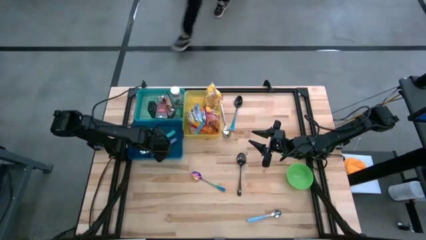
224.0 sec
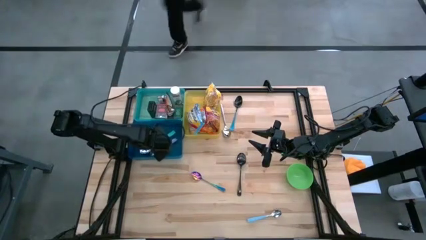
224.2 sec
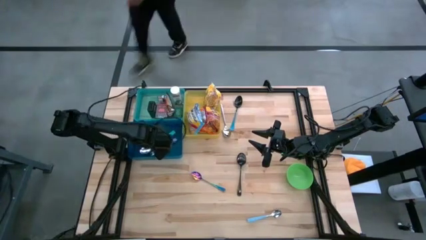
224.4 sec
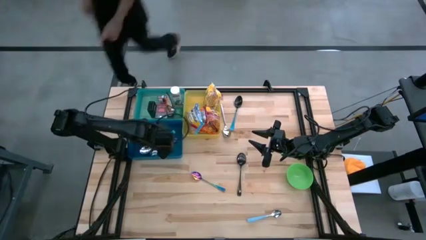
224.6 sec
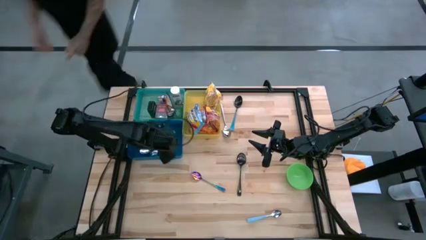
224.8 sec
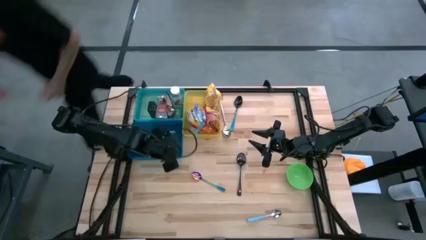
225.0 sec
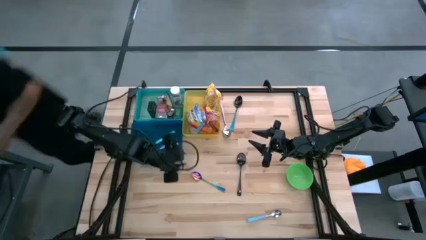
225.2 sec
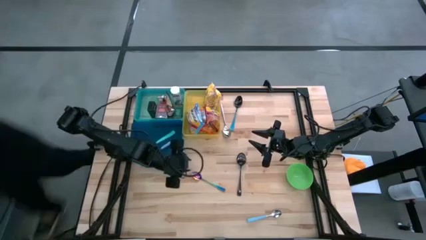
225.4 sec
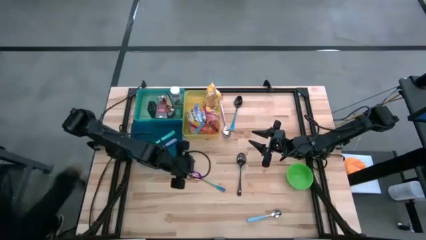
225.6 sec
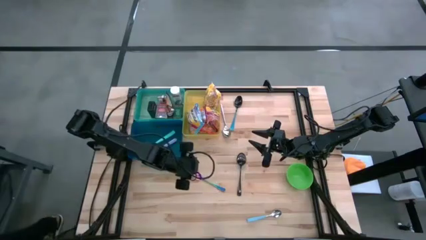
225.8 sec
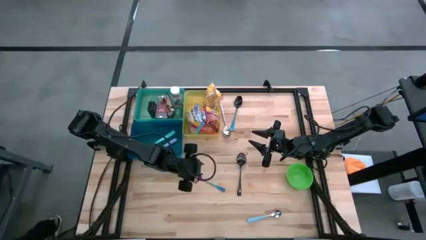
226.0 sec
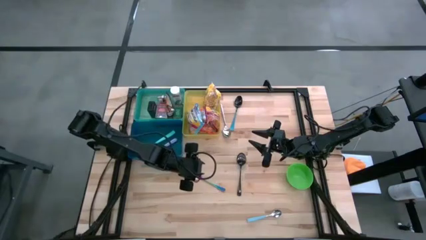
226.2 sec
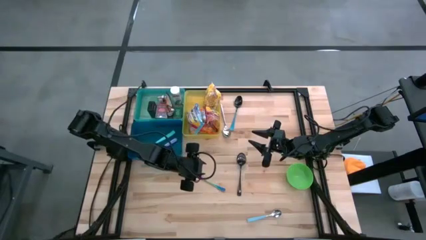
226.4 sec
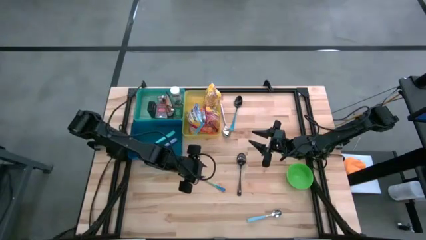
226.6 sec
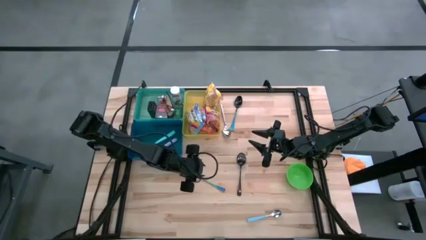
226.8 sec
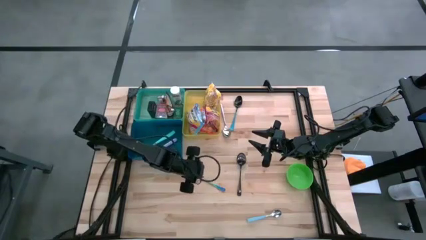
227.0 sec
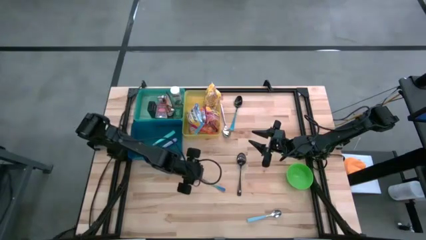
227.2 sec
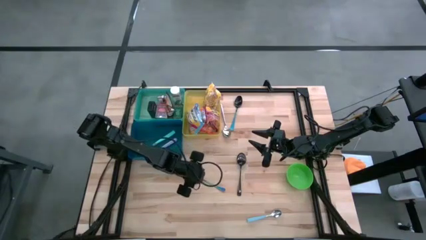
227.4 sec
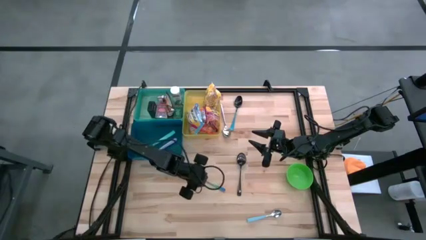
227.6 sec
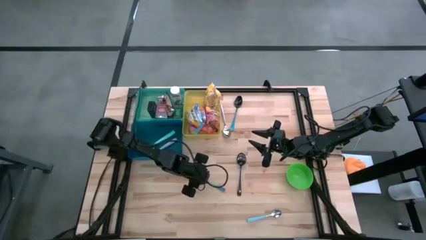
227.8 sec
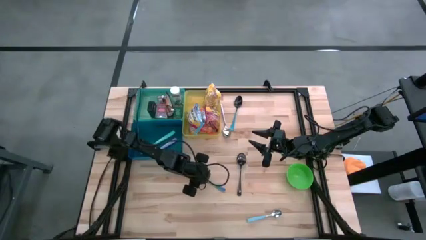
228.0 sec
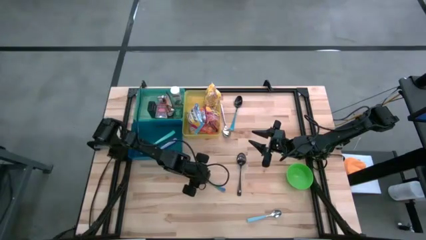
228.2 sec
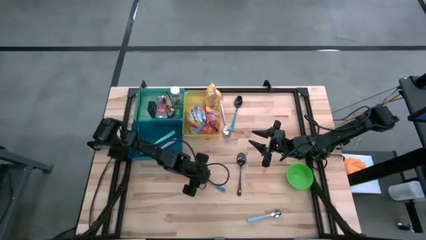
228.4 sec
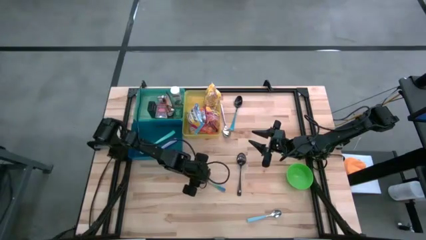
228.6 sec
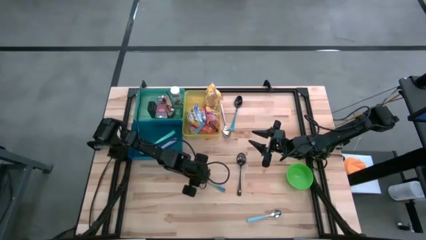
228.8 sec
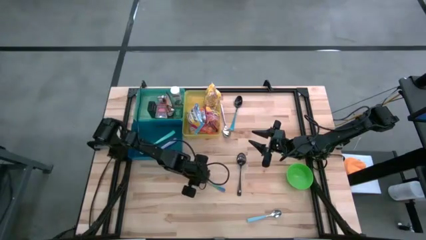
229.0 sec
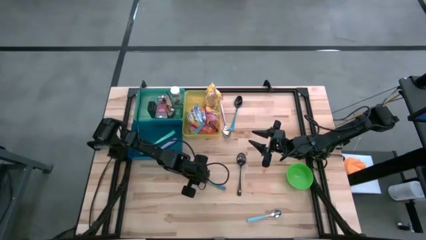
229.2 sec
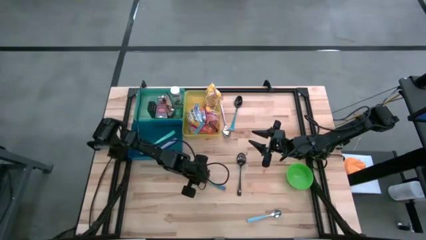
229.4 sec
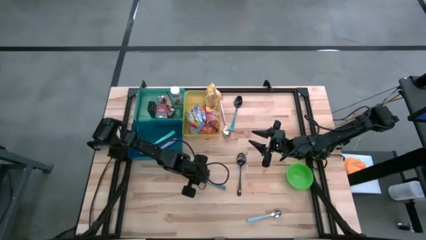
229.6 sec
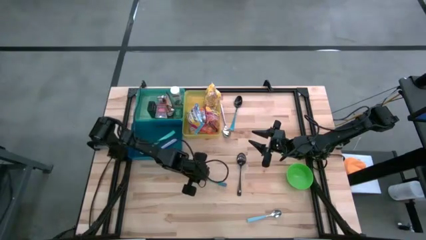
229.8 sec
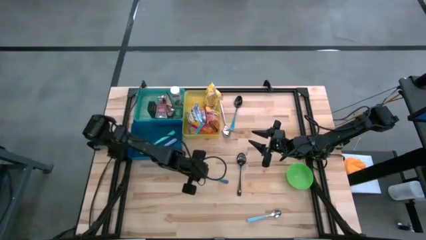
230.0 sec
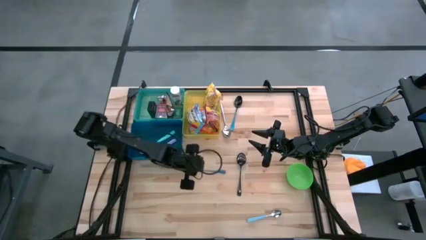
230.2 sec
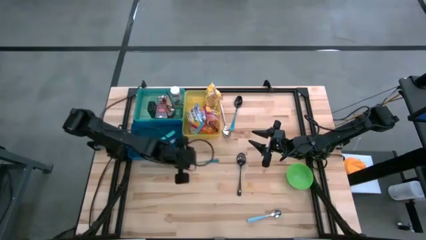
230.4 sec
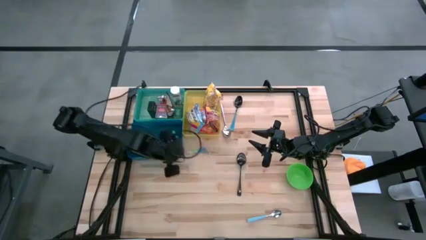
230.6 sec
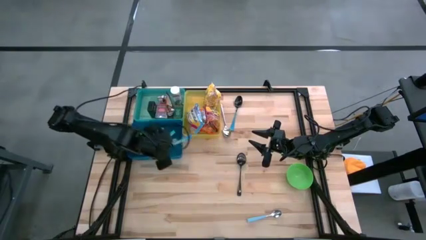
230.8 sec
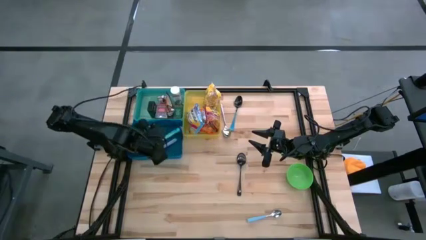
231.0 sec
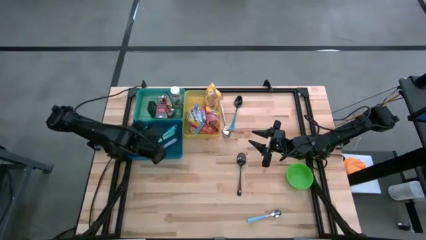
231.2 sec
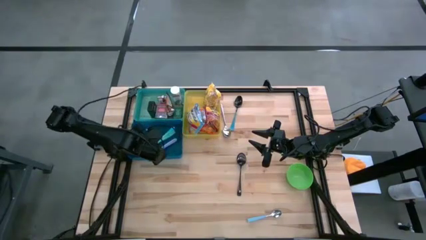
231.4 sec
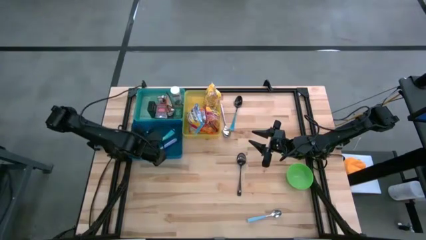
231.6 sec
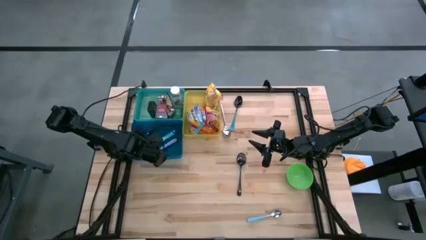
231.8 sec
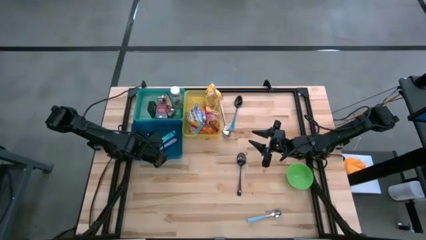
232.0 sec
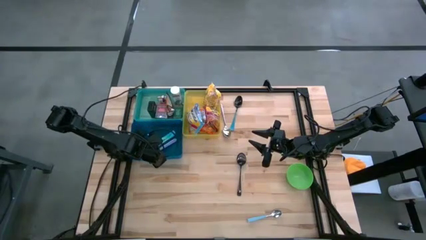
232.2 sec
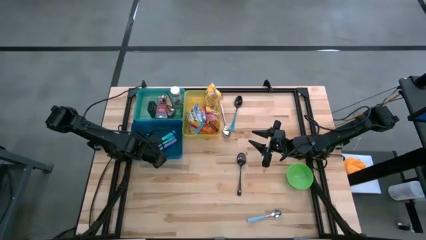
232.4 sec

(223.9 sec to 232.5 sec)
Put the blue green spoon into the blue bin

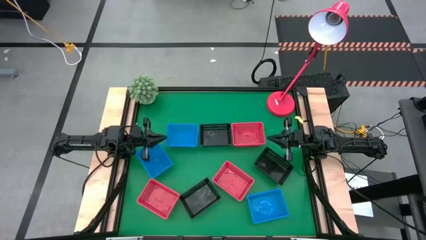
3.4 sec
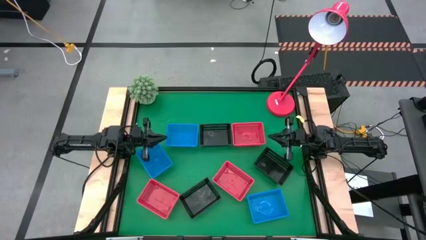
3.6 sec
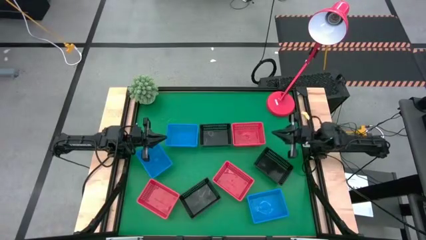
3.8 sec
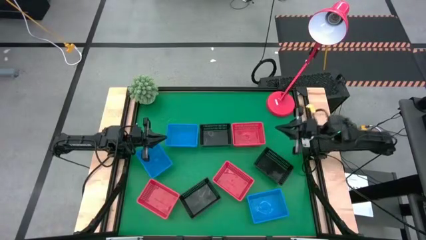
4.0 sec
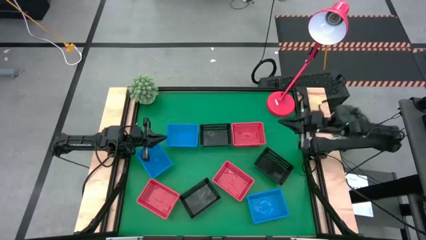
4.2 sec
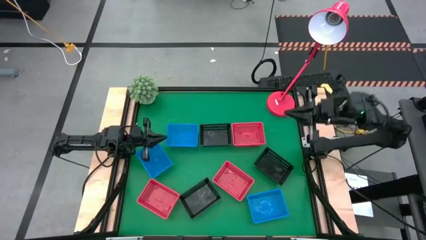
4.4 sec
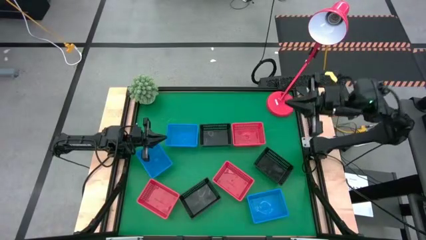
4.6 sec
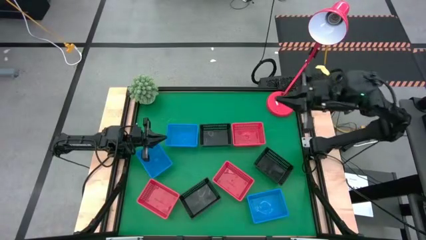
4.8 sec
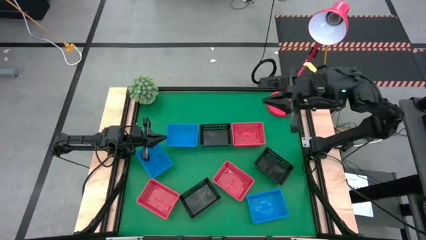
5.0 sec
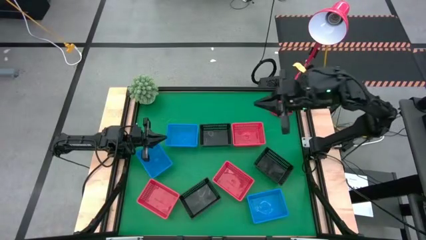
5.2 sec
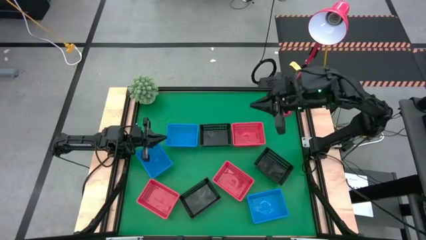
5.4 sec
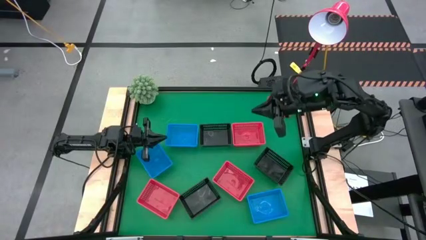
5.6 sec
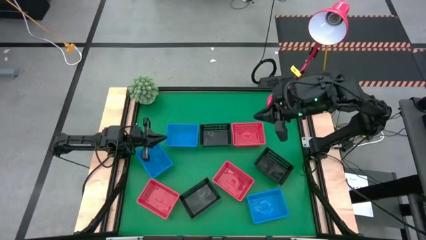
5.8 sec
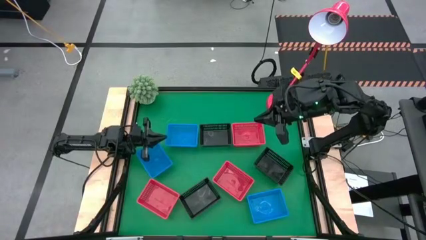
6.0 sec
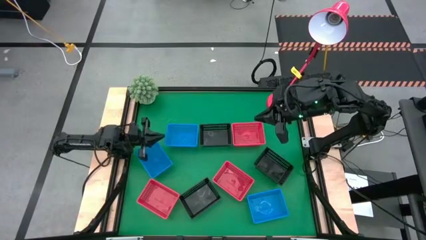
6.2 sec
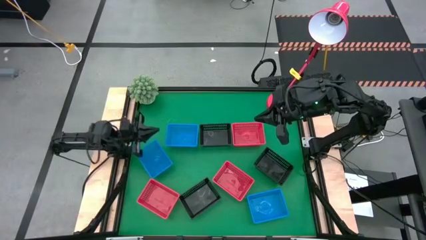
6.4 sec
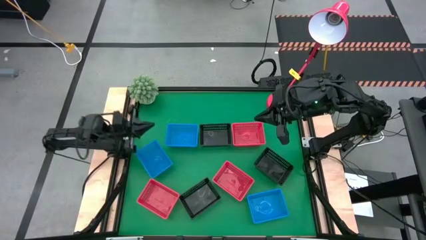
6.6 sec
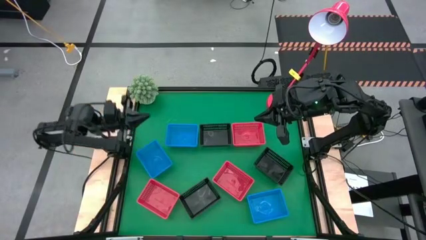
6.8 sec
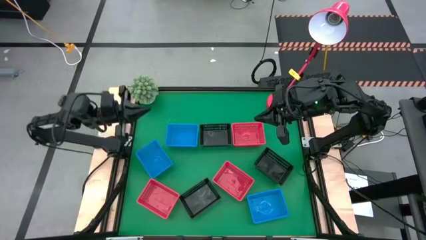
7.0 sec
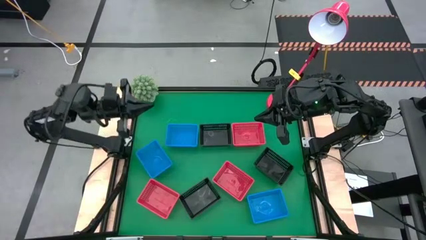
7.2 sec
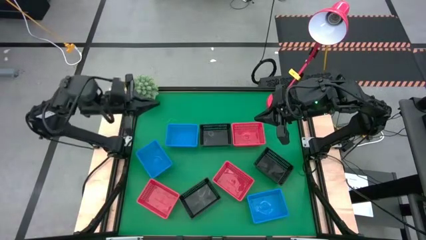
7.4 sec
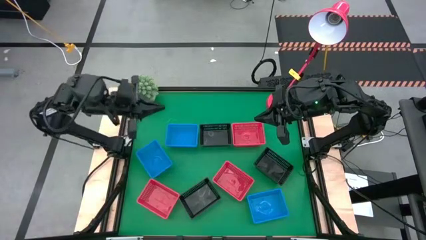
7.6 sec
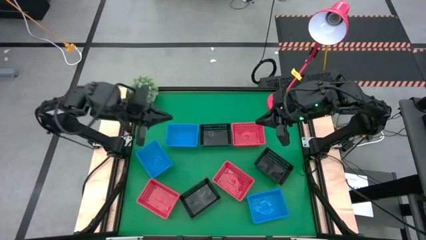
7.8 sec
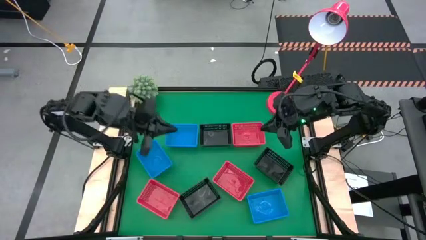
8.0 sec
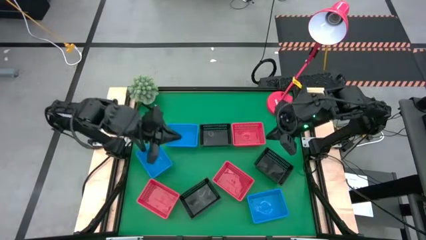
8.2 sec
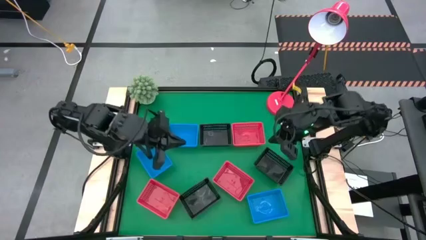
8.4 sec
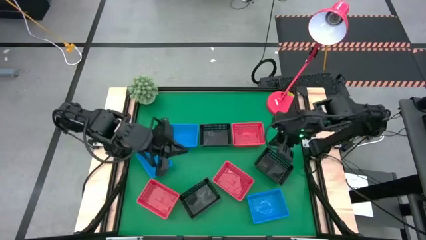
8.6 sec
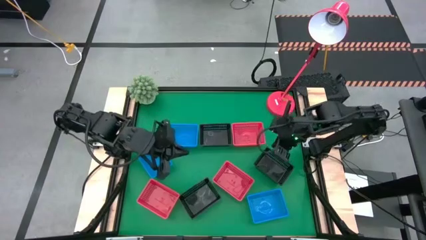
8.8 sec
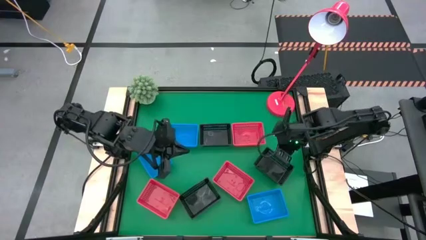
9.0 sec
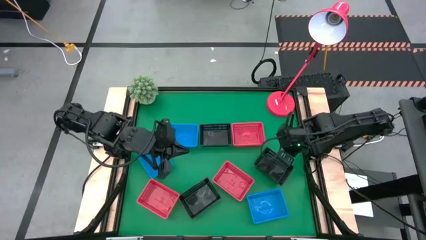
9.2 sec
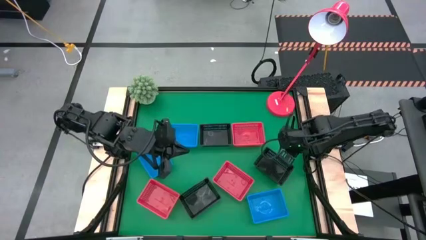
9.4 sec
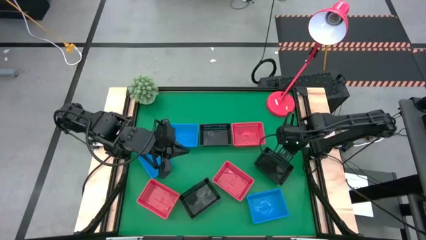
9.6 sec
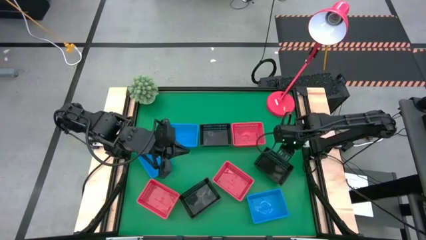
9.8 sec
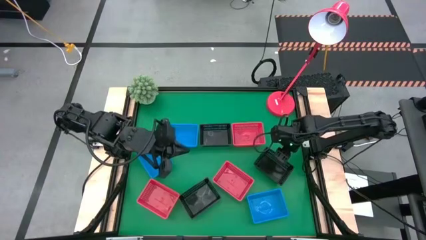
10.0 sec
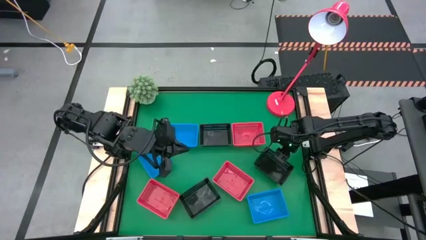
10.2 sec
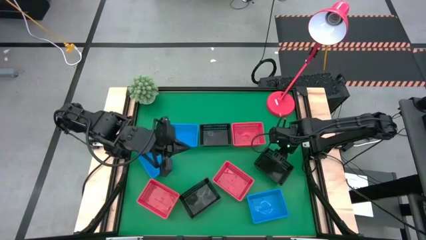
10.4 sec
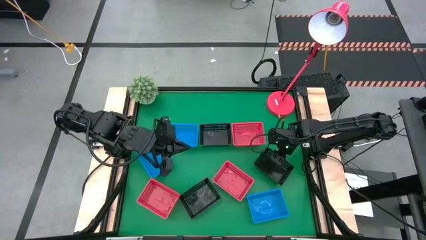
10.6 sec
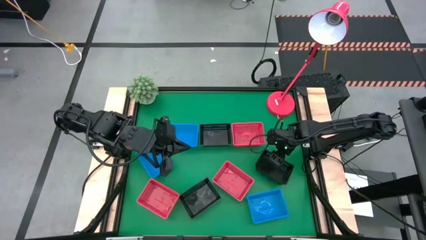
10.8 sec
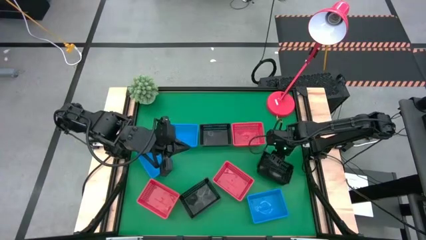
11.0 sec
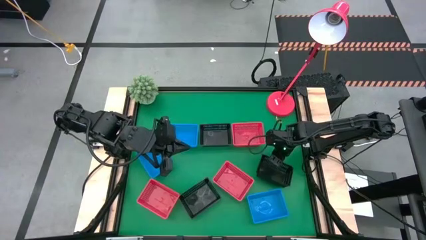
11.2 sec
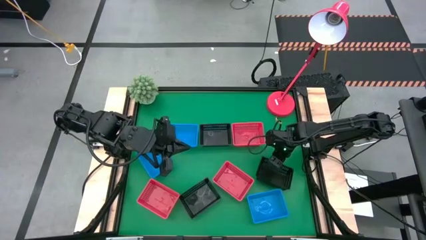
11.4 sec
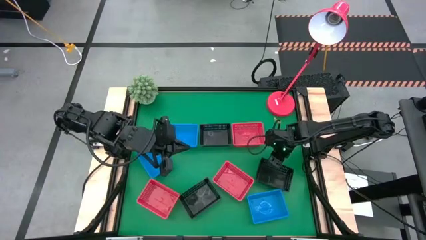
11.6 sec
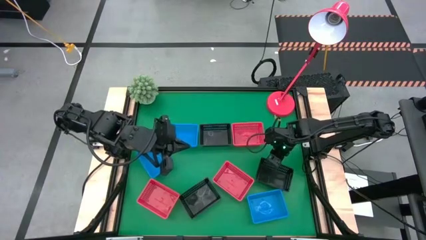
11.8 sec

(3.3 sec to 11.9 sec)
Stack the middle black bin on the top black bin
